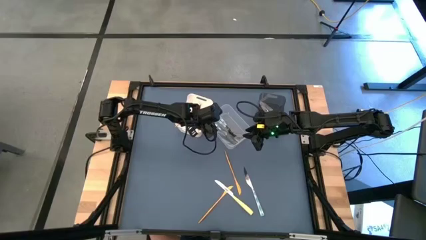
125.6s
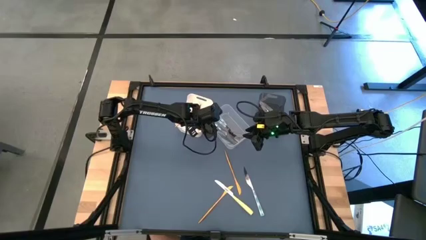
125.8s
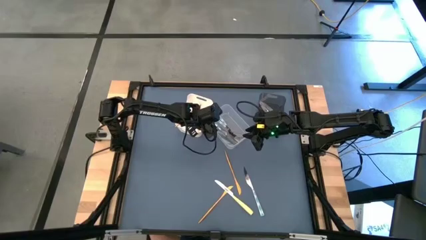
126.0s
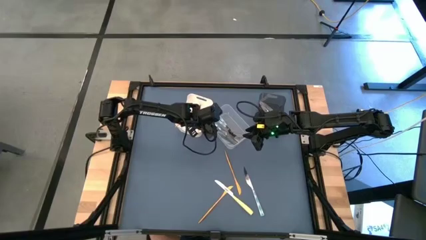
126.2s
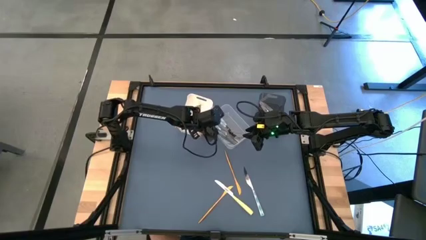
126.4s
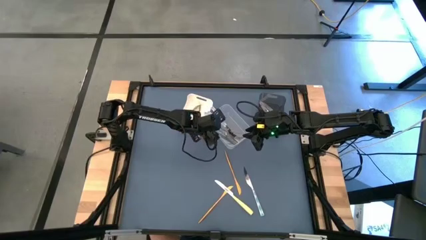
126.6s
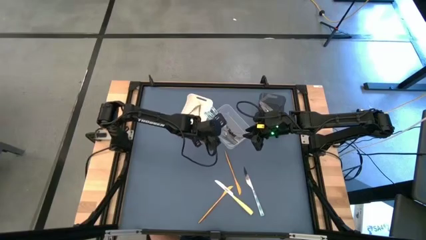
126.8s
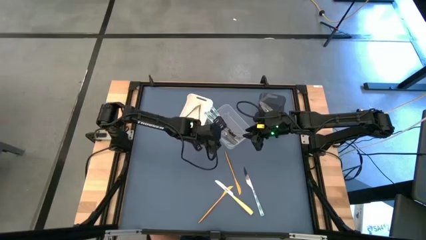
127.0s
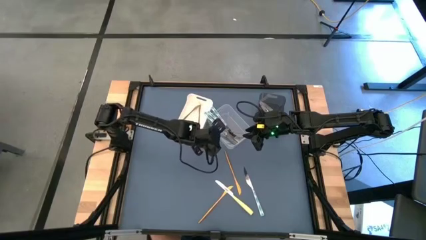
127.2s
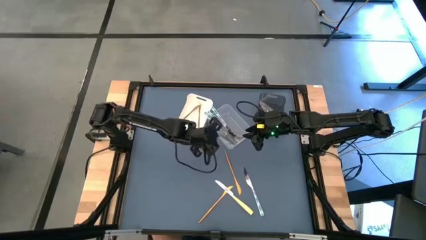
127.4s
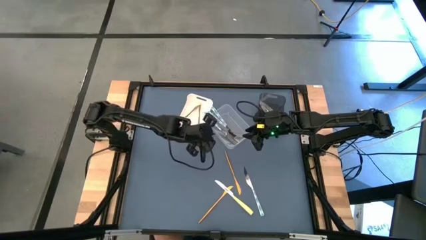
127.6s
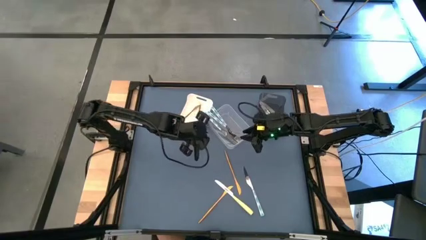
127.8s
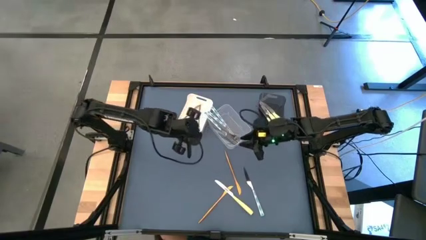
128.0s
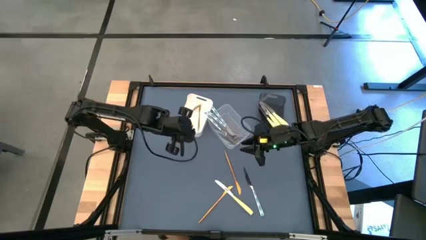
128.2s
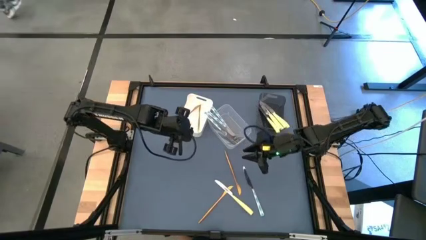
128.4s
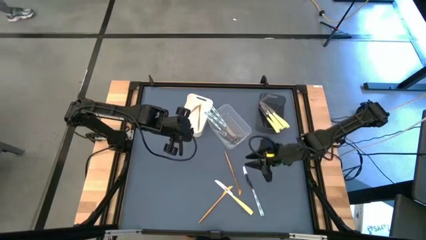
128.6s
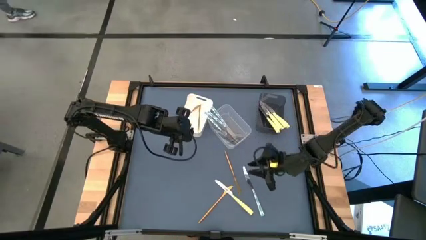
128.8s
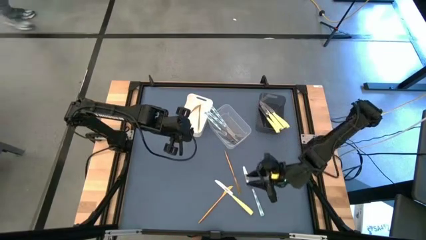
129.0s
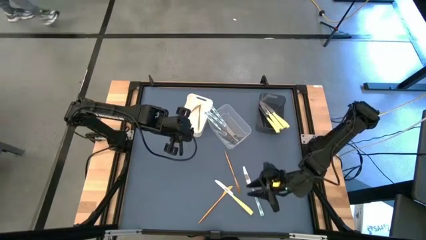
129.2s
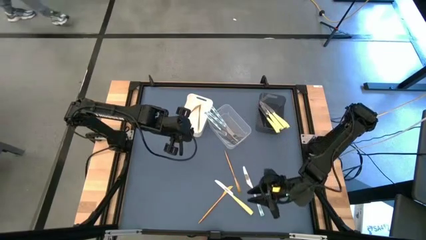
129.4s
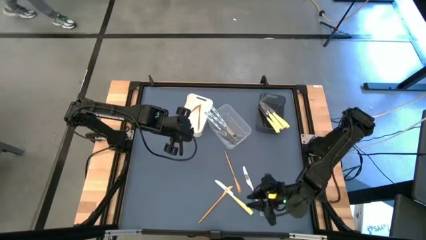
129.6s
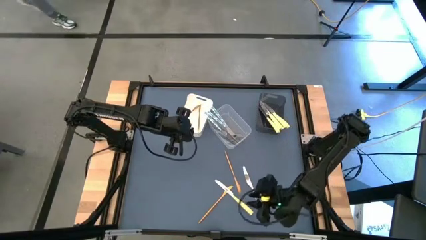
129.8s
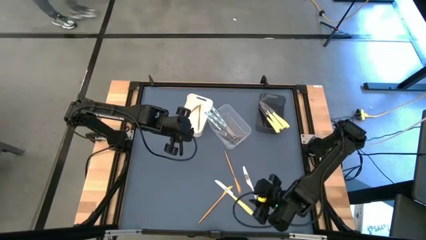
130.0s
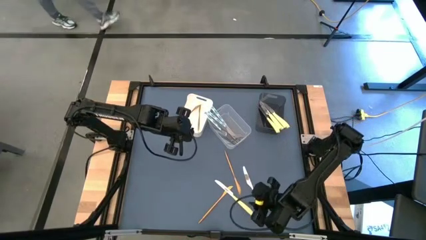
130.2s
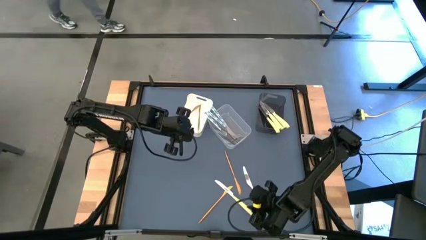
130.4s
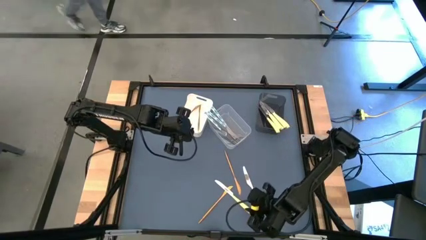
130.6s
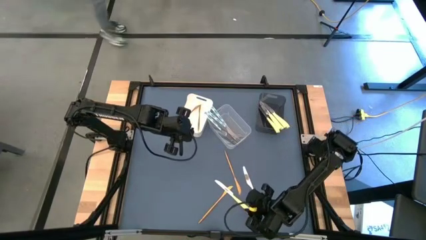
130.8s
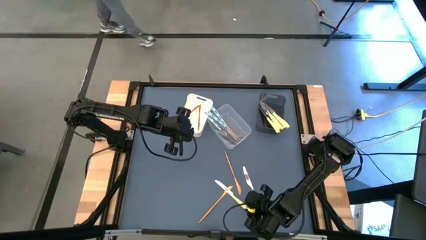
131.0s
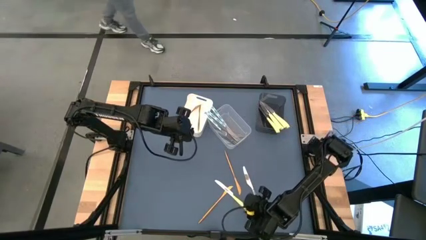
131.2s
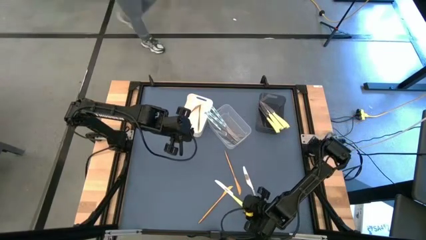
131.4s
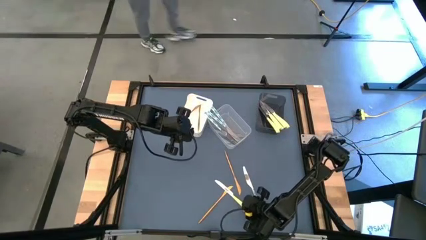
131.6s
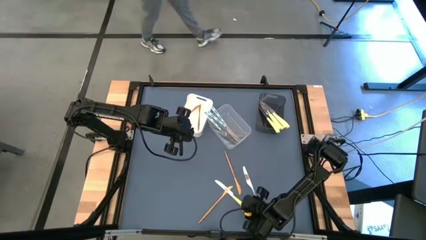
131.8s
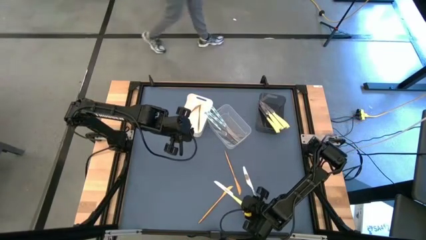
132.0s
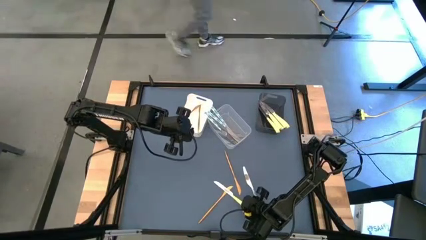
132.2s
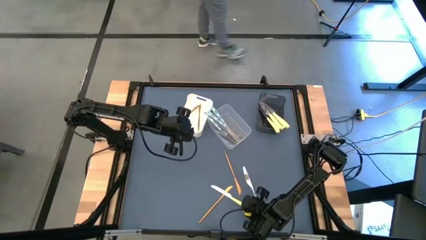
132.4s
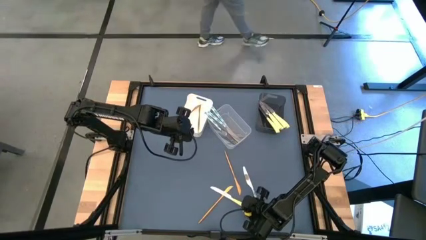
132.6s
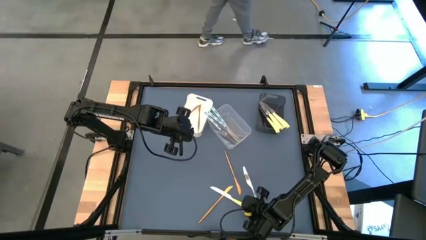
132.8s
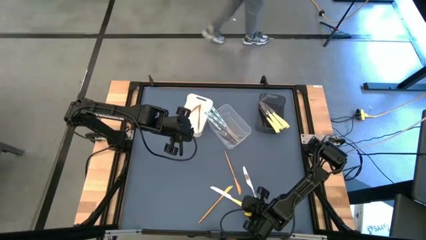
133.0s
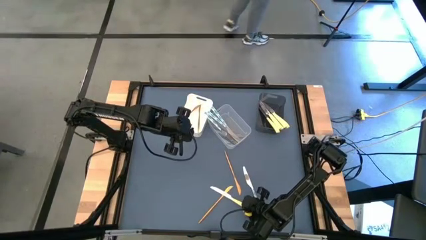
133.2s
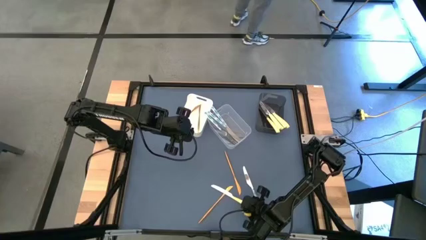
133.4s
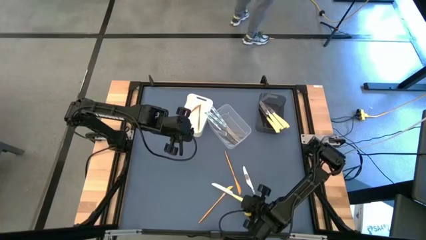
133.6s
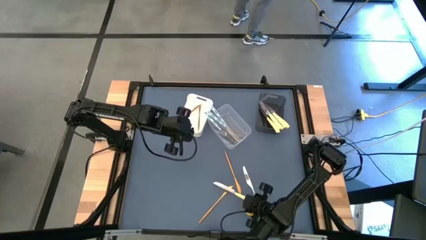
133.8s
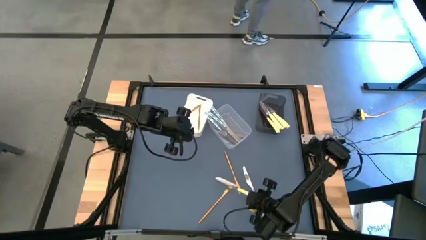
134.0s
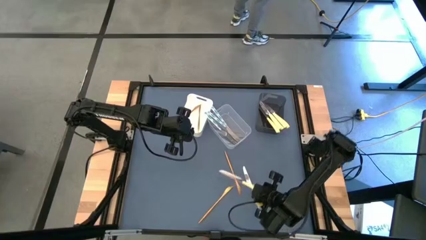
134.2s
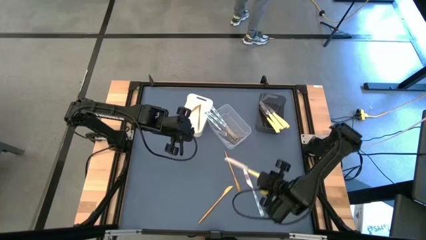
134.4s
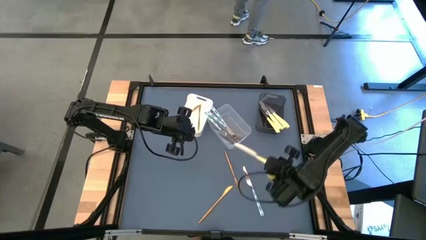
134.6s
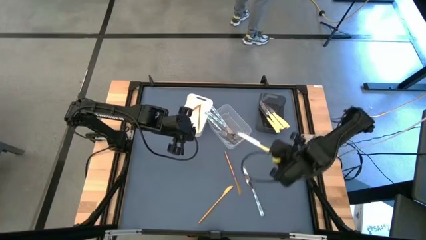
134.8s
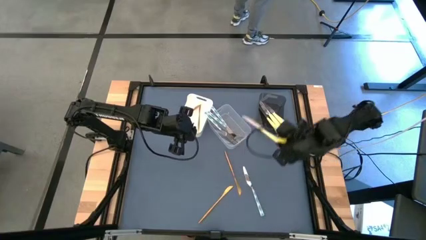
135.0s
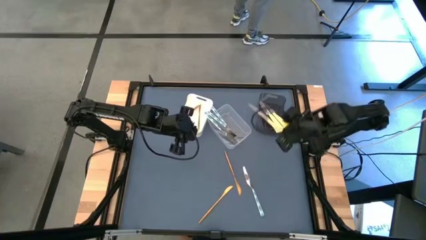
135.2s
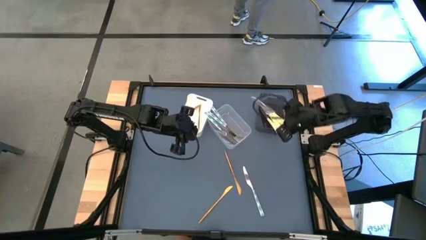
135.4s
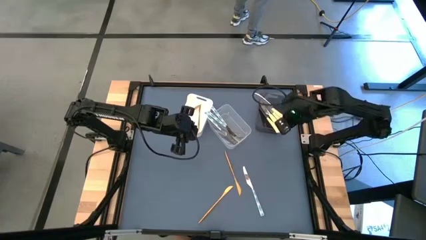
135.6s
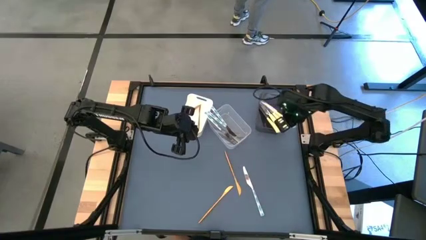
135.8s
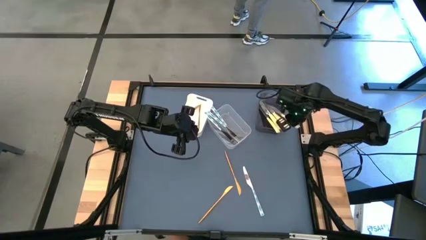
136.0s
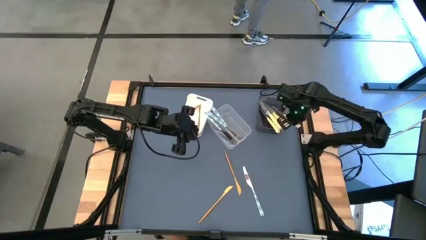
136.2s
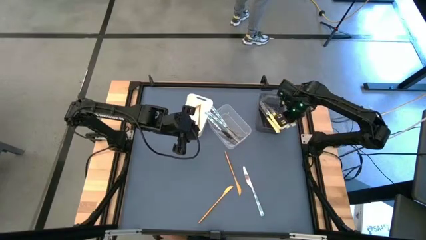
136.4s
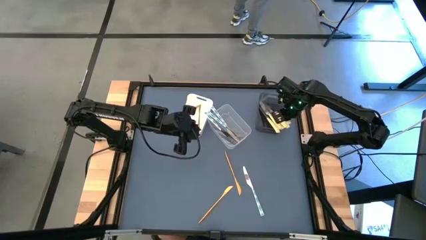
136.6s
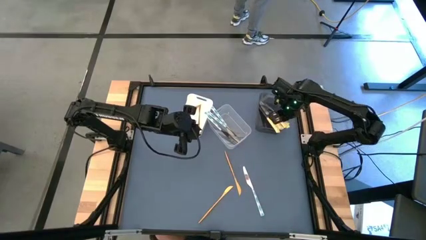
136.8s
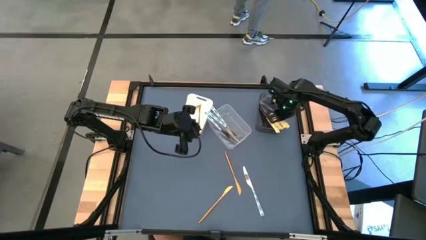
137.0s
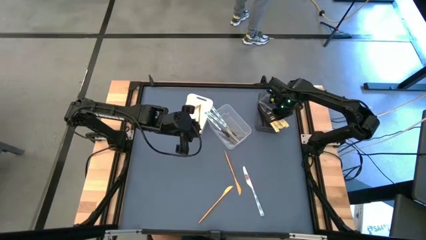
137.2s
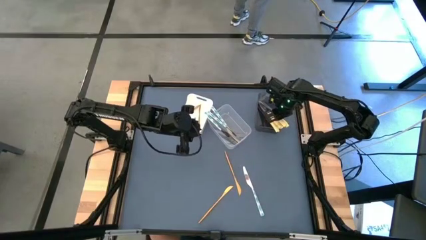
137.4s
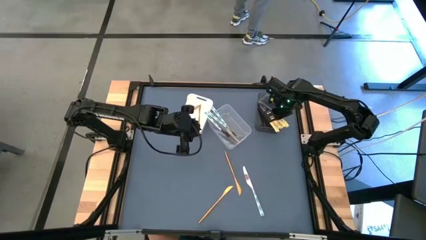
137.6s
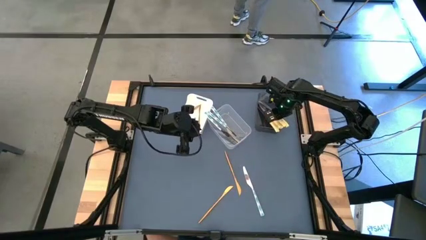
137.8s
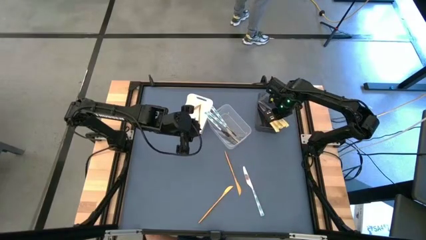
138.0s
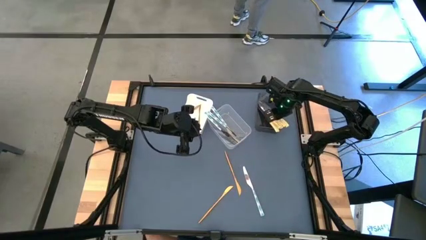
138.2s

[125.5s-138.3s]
Task: Sort silverware by color (type)
Put the yellow knife into the black bin
